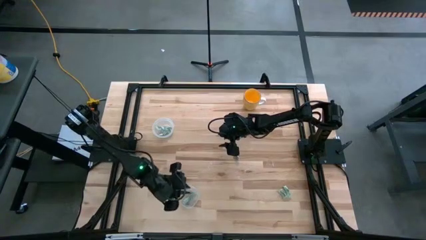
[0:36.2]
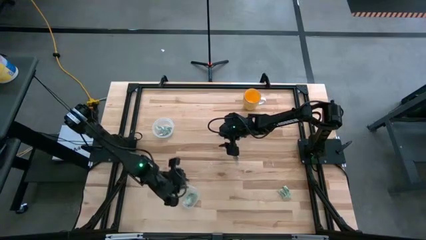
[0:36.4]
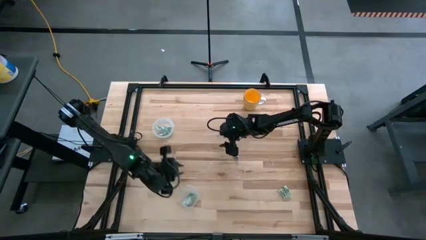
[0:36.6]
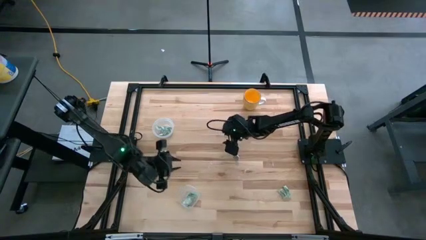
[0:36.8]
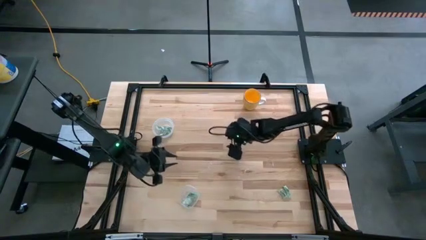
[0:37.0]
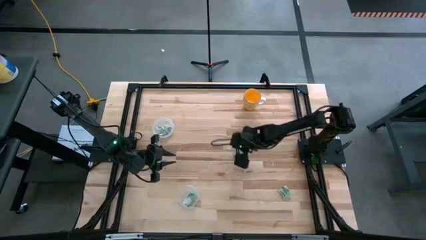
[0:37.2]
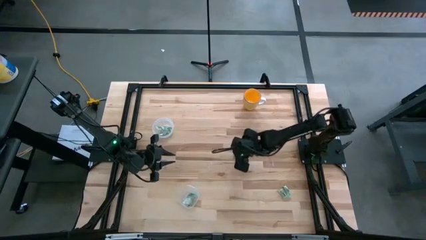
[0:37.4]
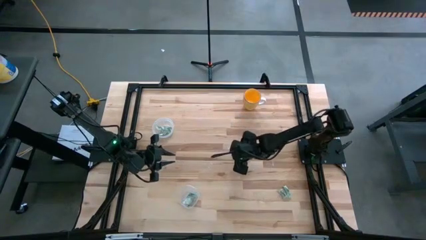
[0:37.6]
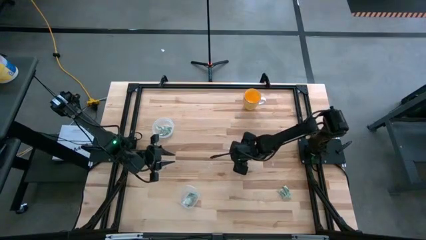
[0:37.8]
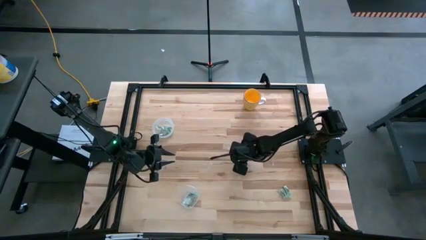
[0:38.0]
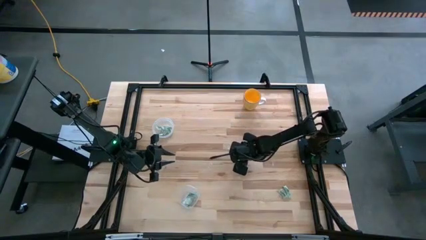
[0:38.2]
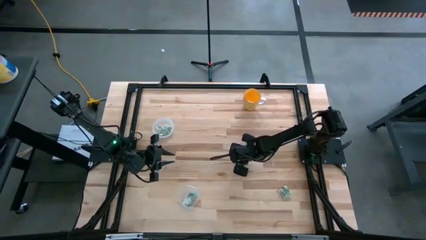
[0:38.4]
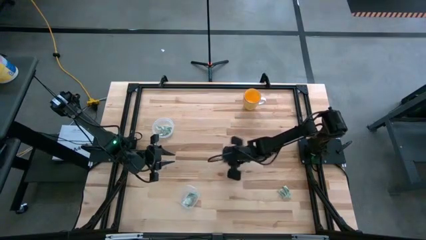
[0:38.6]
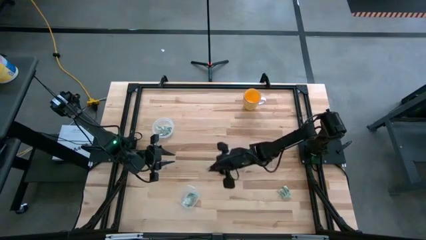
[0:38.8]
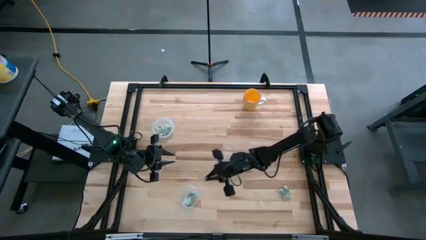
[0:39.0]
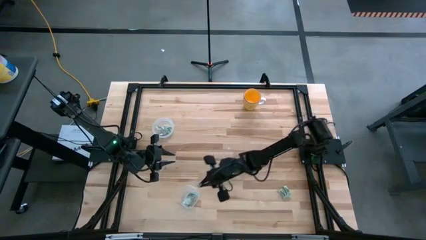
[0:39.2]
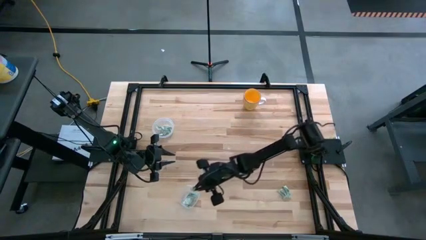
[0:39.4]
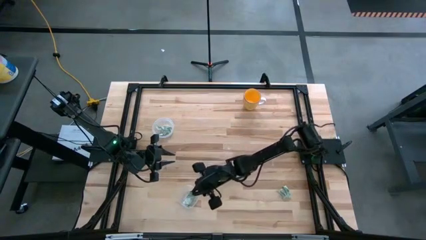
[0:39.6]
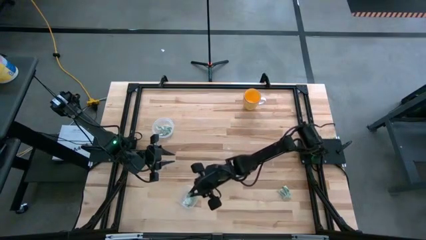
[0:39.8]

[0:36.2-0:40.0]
Task: Pick and place items into bin
Put the stevia packet into the bottom transparent bin

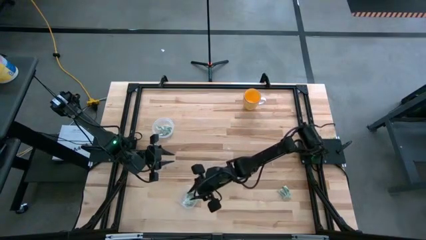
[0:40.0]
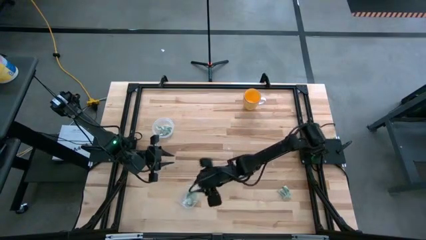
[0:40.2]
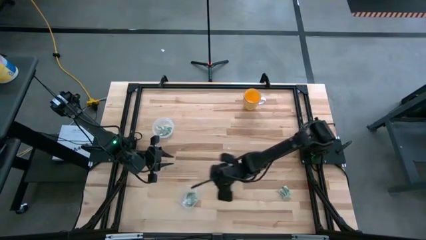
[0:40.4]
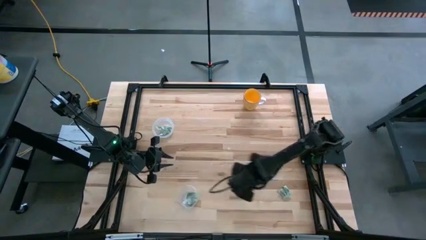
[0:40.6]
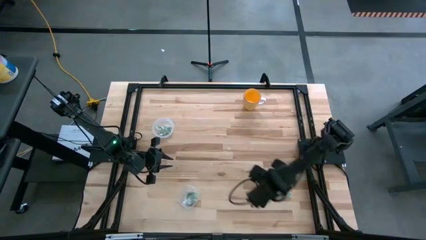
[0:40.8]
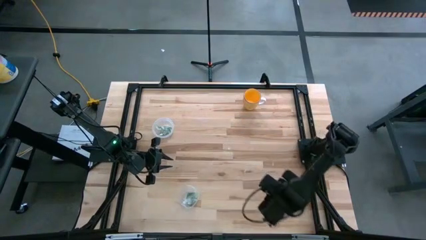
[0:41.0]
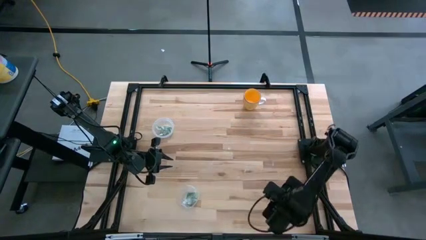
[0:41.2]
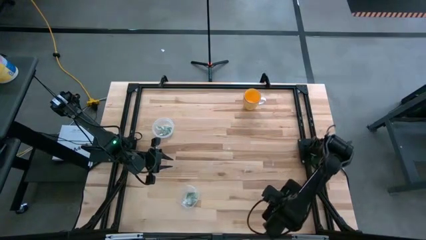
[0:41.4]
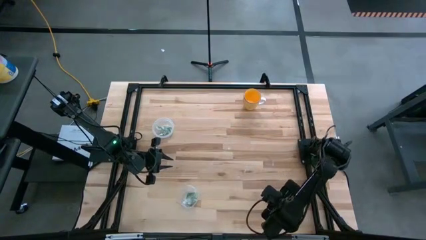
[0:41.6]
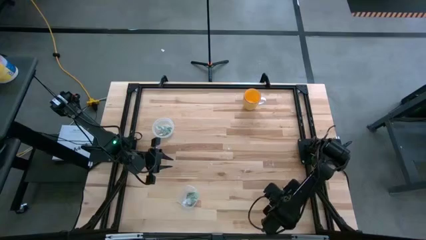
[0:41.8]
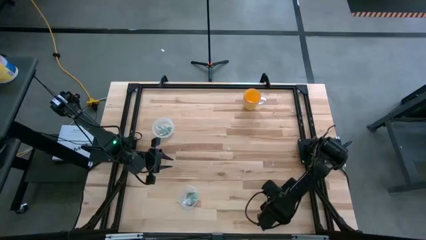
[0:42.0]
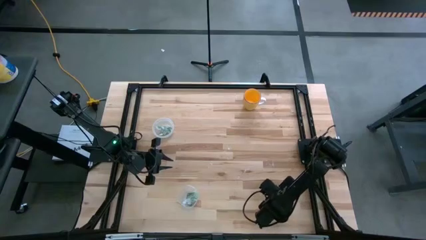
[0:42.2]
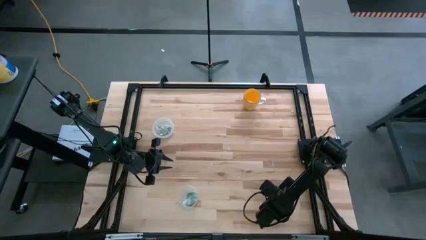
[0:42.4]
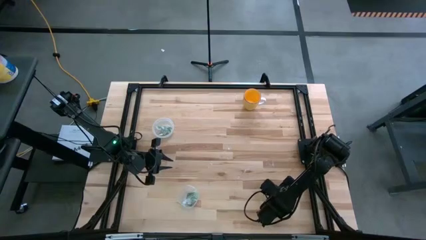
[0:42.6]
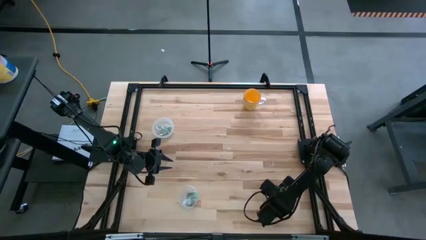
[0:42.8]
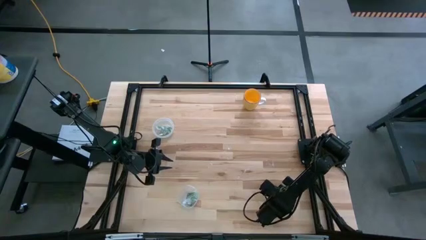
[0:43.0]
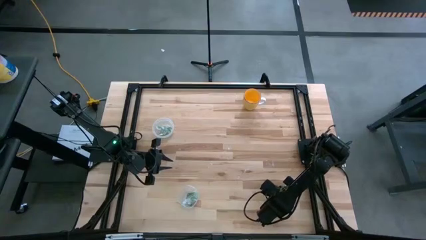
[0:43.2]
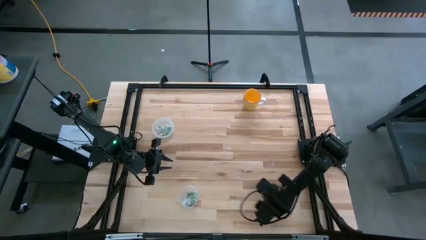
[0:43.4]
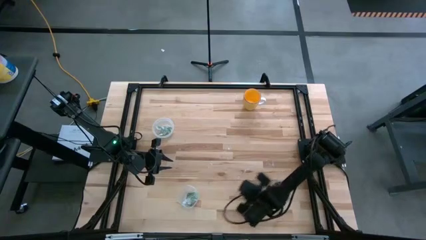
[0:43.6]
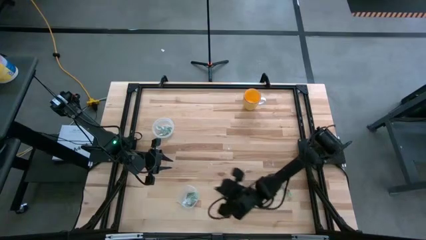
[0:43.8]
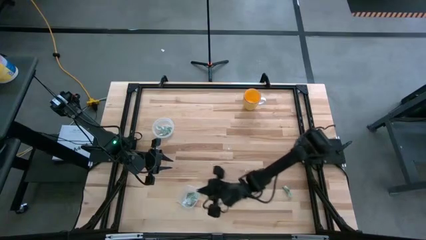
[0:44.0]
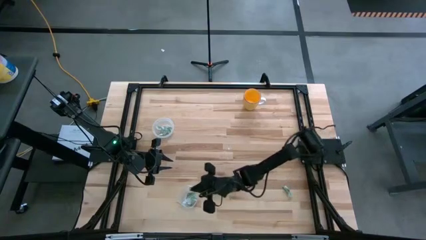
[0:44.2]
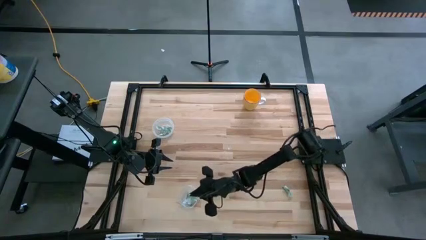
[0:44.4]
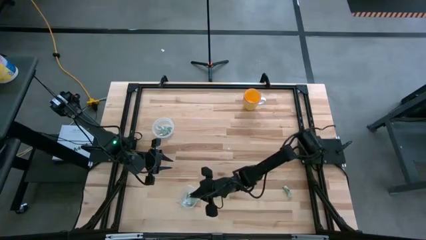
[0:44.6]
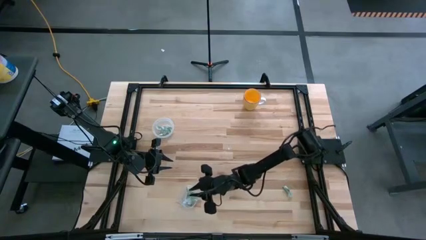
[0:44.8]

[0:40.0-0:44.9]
Put the stevia packet into the bottom transparent bin

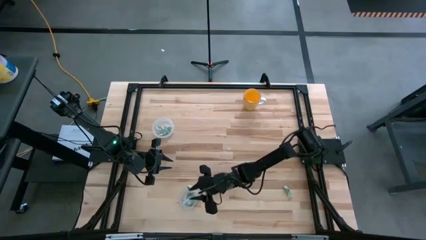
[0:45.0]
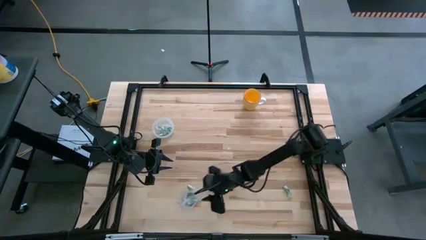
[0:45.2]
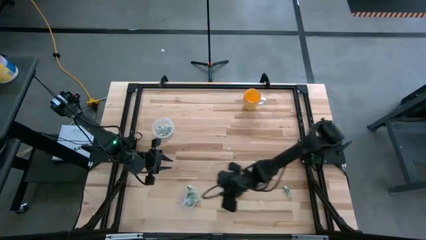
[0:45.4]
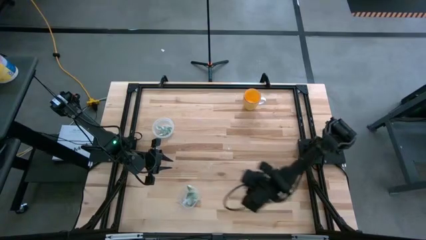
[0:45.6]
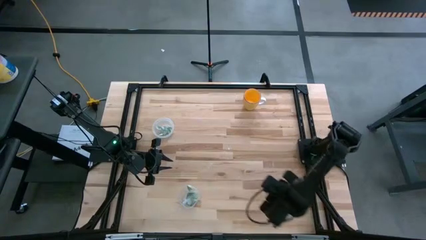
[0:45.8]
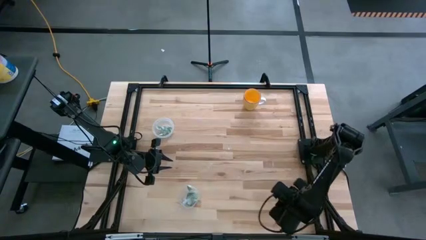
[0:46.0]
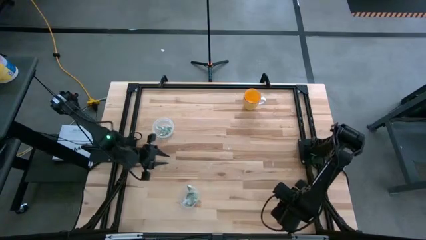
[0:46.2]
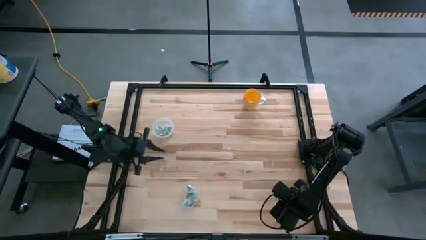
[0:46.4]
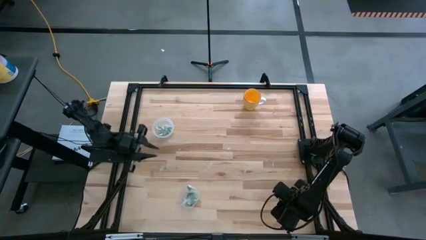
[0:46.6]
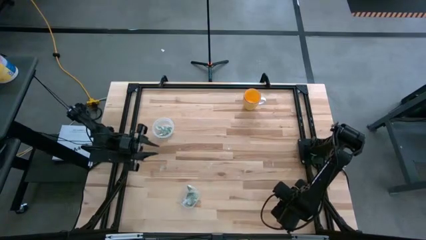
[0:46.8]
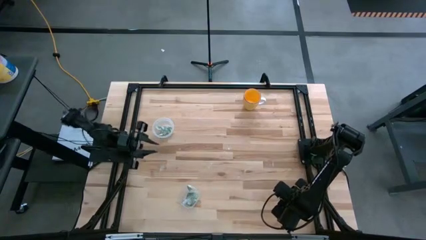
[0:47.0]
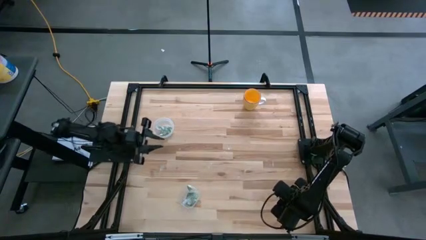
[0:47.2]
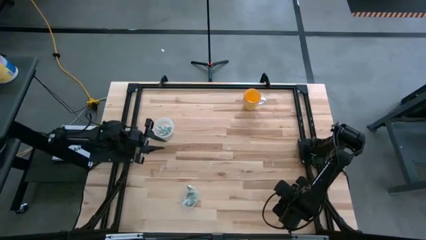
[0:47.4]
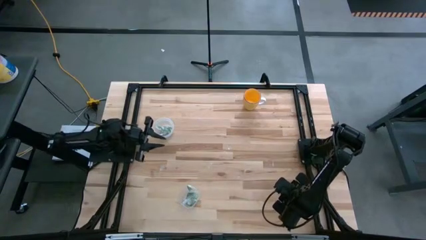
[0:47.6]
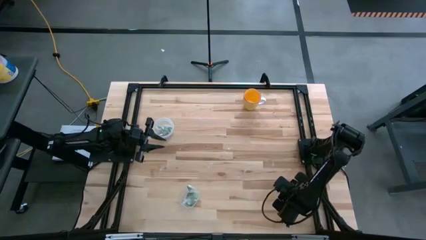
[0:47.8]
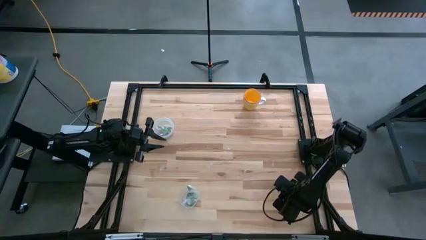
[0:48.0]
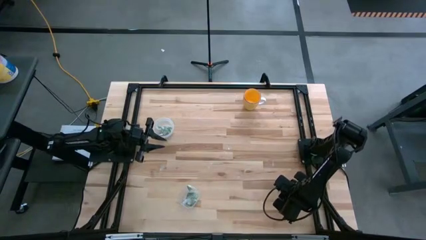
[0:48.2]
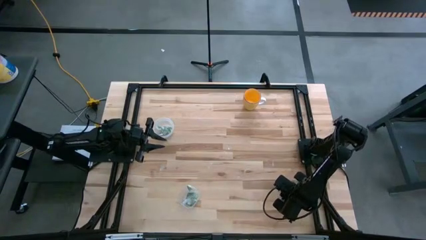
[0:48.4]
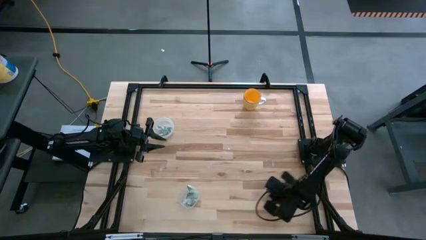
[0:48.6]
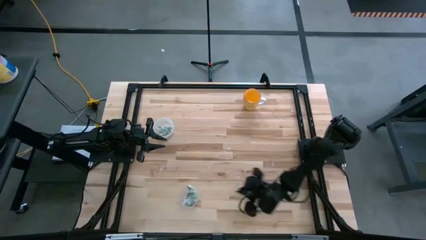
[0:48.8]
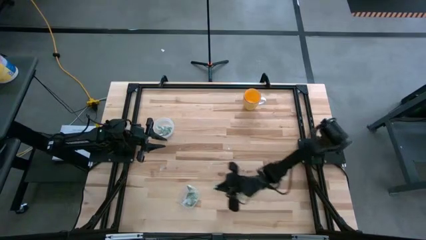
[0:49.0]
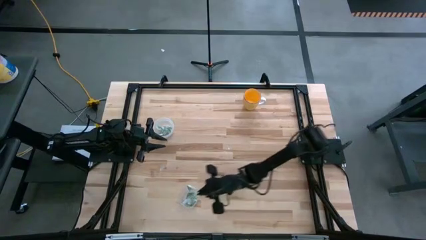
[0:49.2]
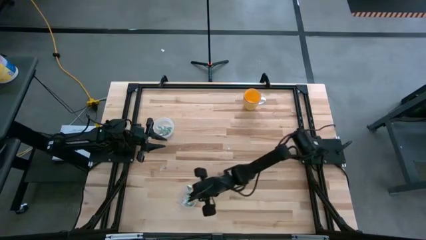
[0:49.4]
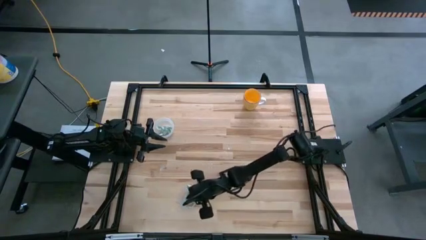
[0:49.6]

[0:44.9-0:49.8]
Put the stevia packet into the bottom transparent bin
